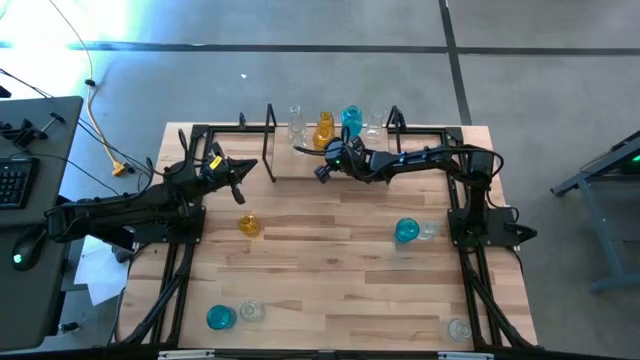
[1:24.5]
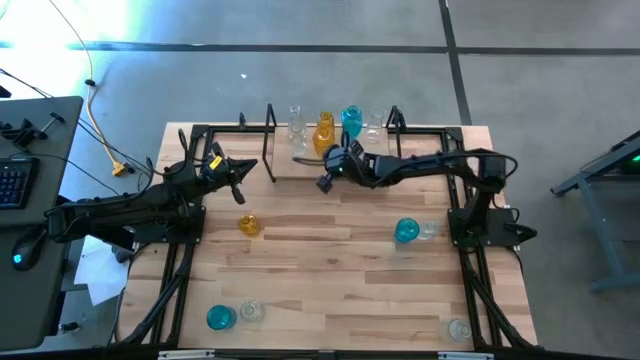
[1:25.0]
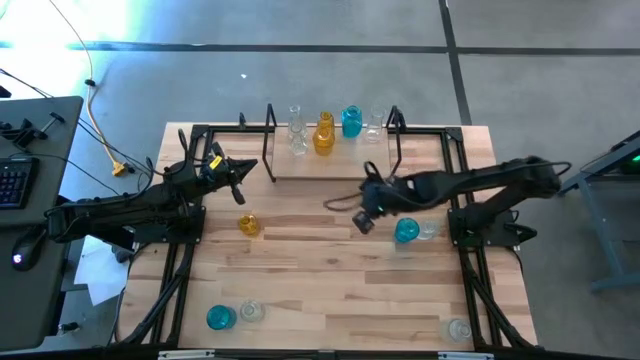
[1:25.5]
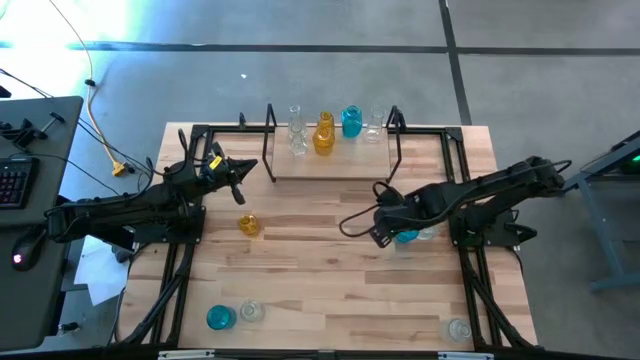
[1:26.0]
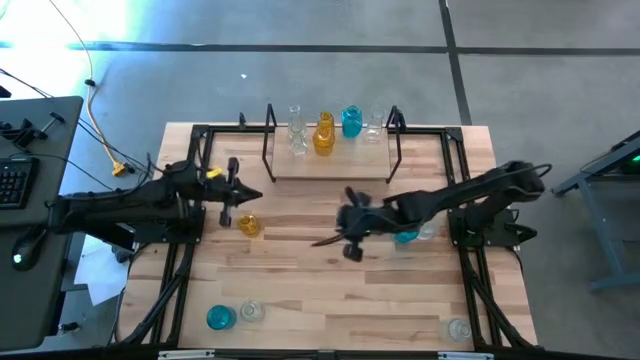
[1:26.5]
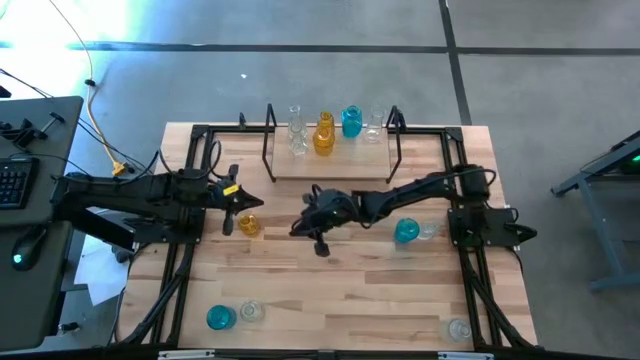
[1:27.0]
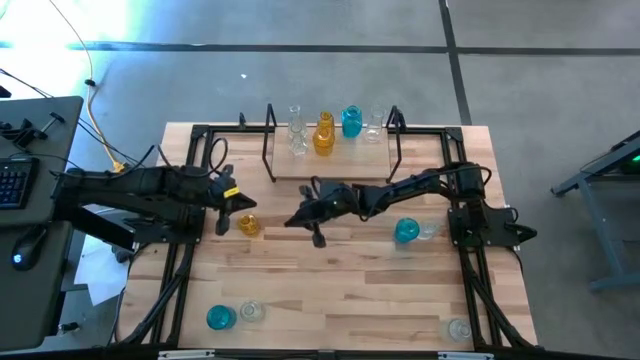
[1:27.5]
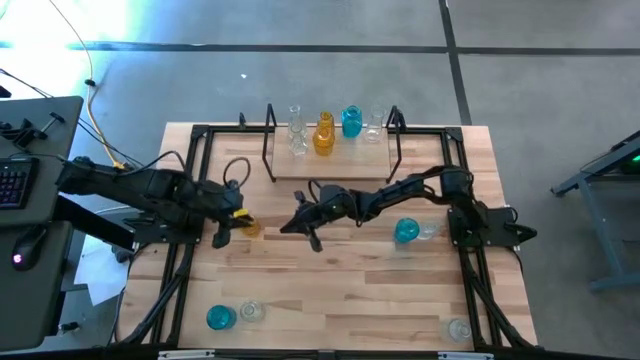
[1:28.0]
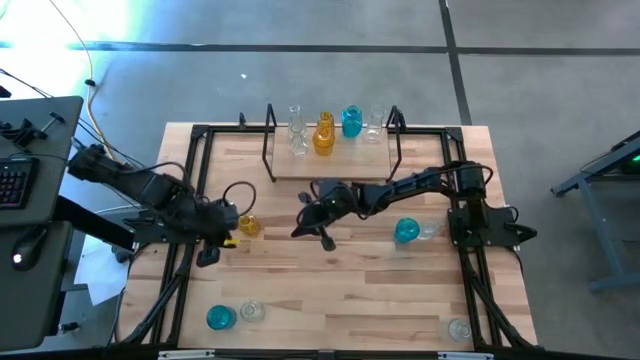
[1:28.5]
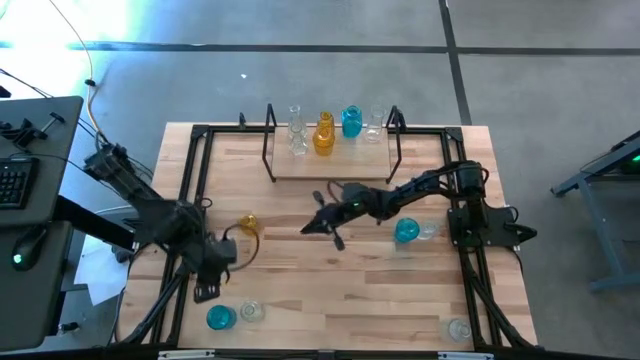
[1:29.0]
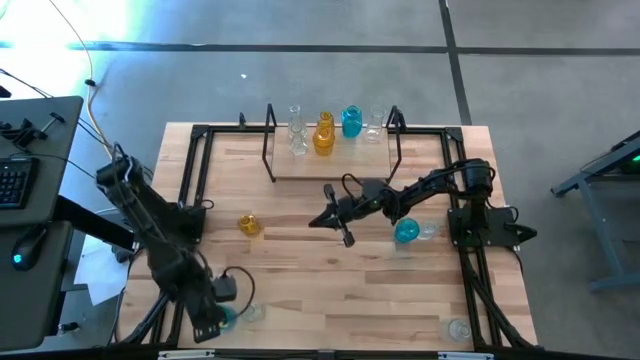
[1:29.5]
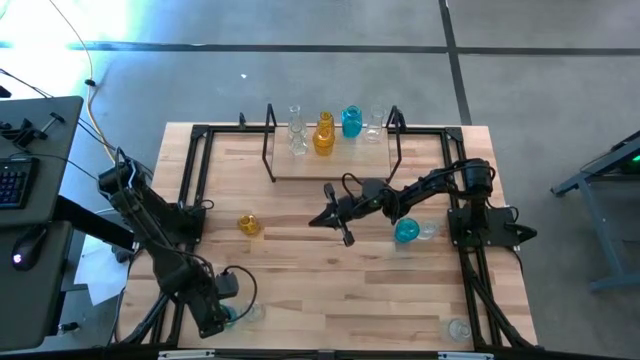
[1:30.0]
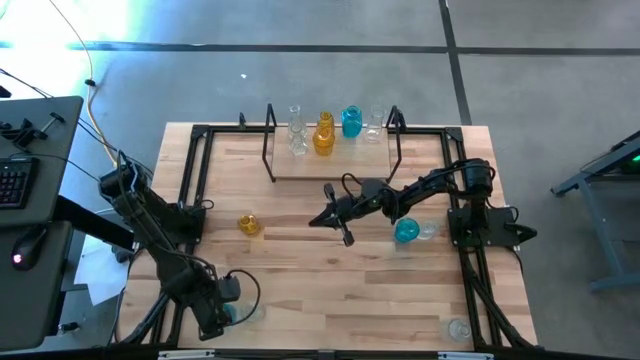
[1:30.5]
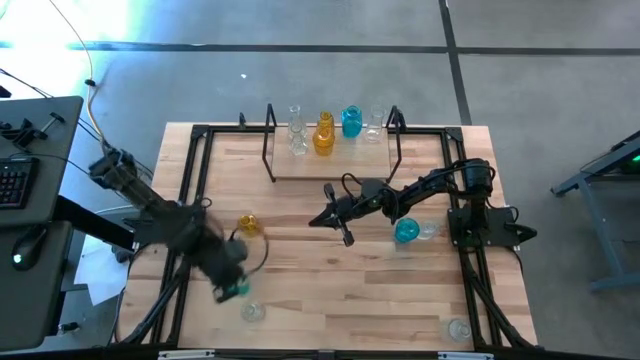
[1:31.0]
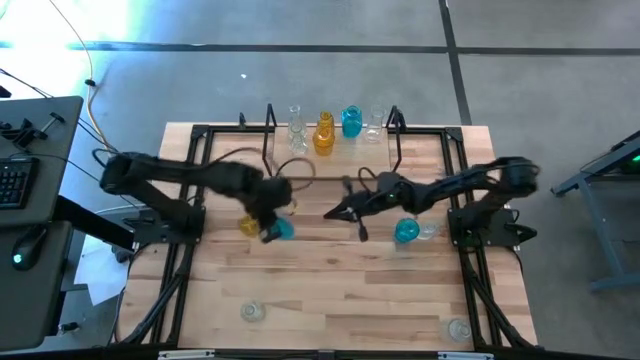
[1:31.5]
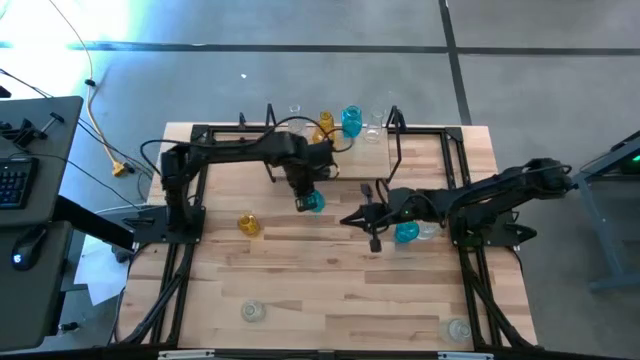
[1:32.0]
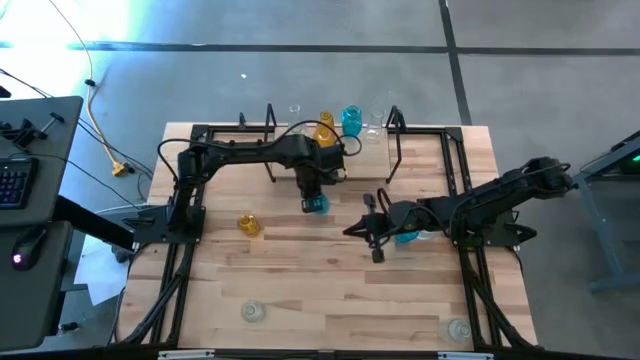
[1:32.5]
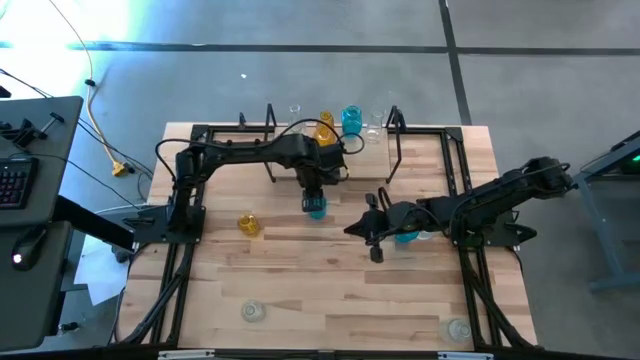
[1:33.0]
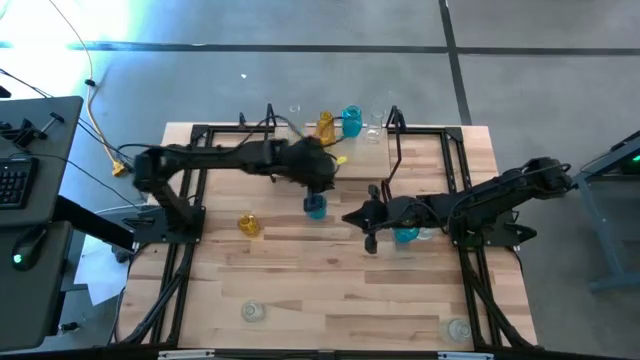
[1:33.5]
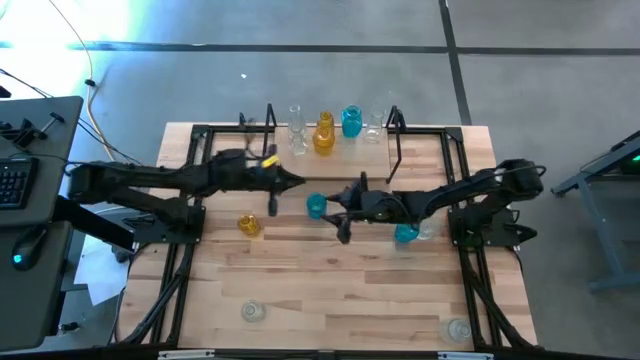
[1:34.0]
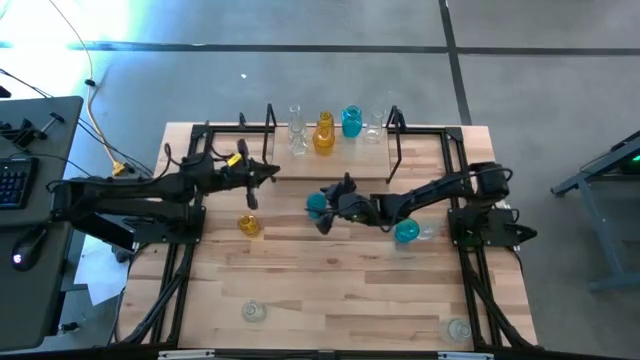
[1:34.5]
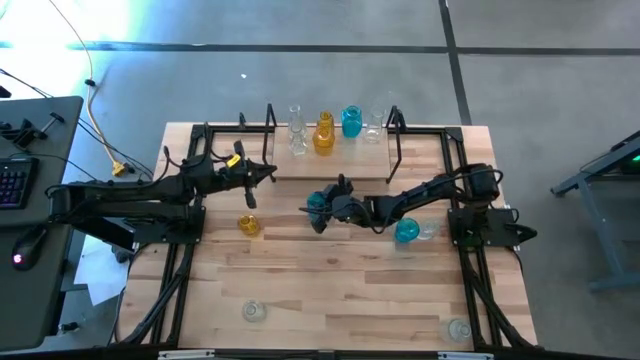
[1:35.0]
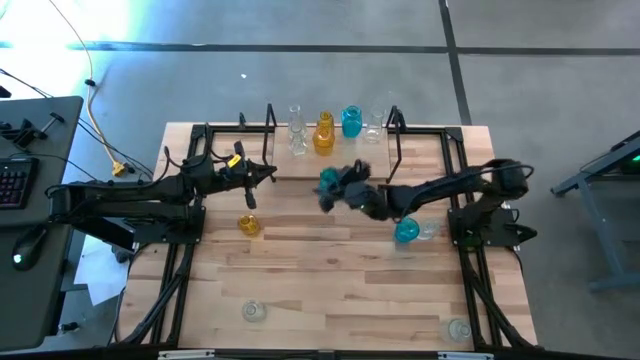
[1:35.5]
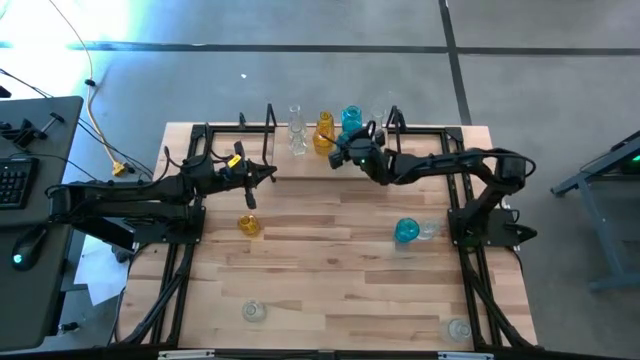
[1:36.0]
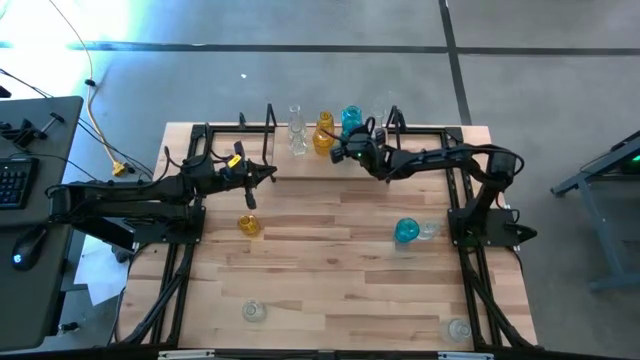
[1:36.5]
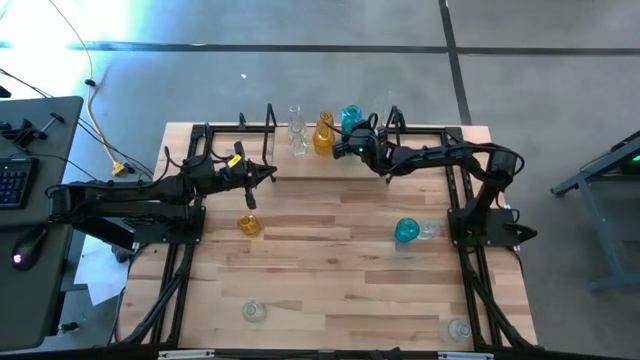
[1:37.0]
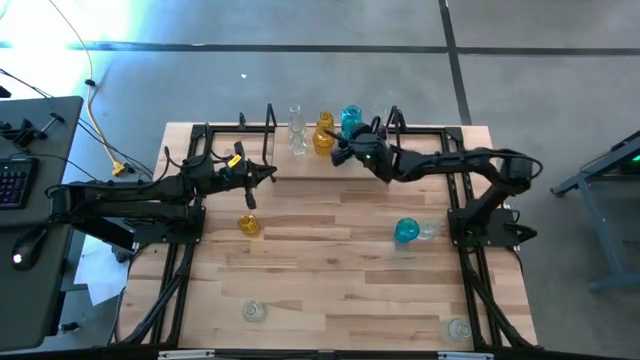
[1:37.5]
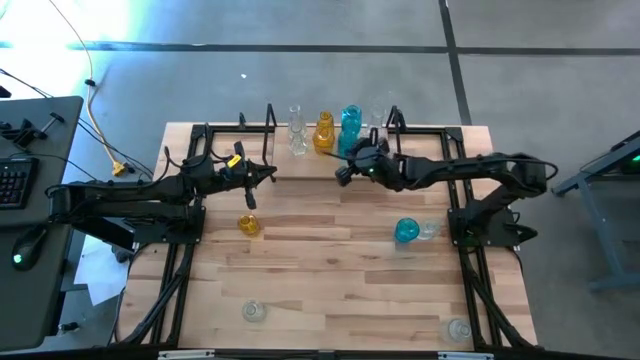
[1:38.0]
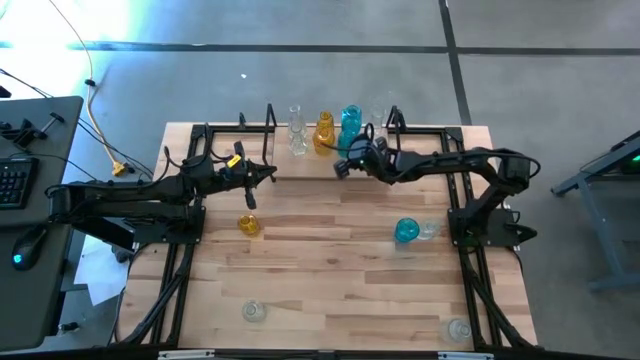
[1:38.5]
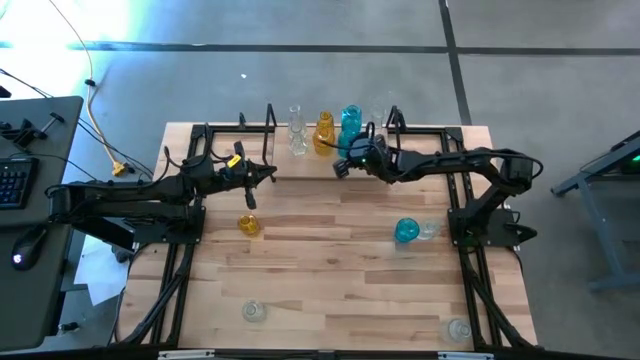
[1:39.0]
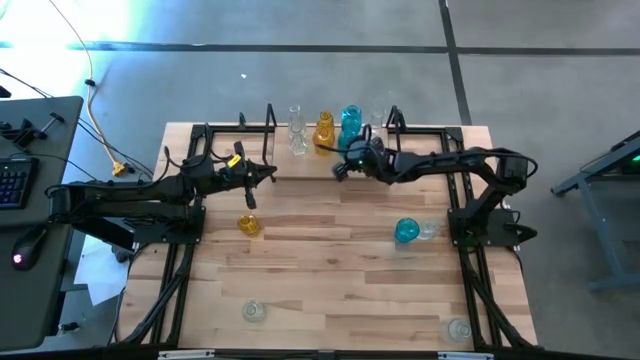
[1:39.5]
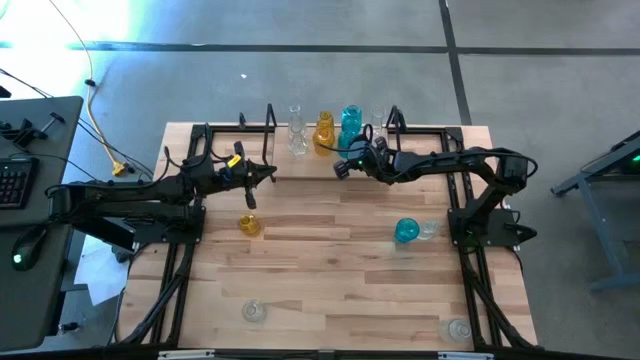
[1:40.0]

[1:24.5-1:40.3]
Task: sort vases onto shelf
Put the blue vase on the shelf aligned with the other blue vase

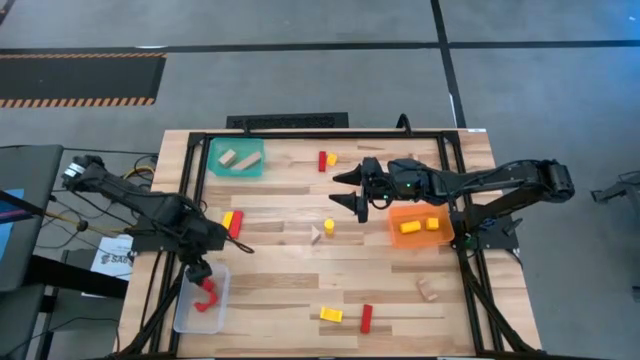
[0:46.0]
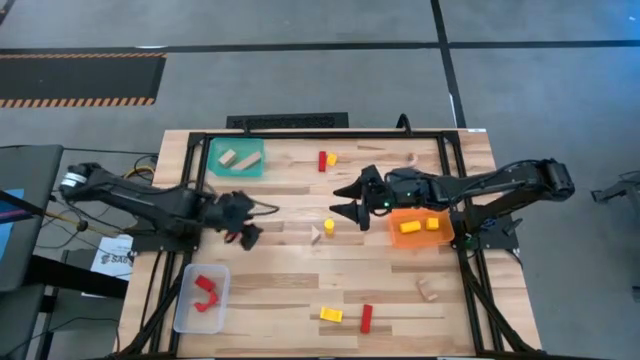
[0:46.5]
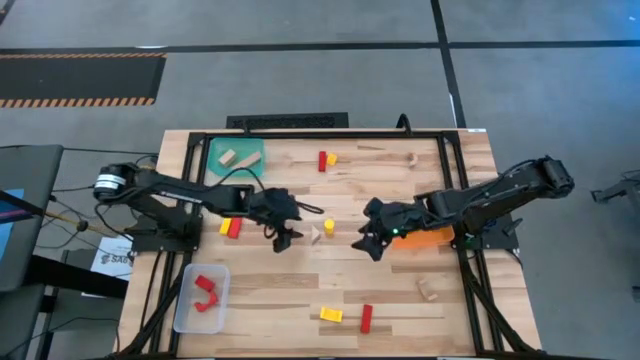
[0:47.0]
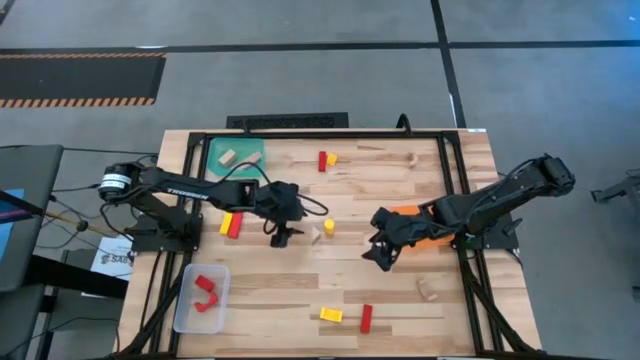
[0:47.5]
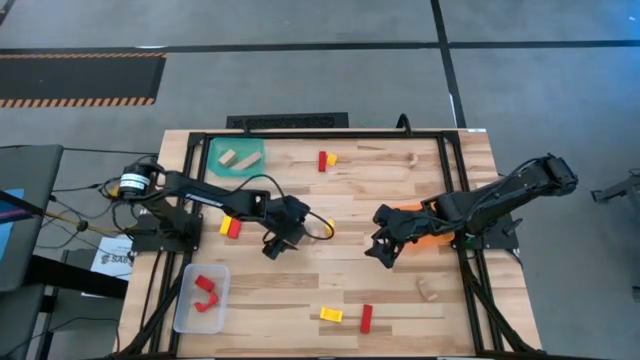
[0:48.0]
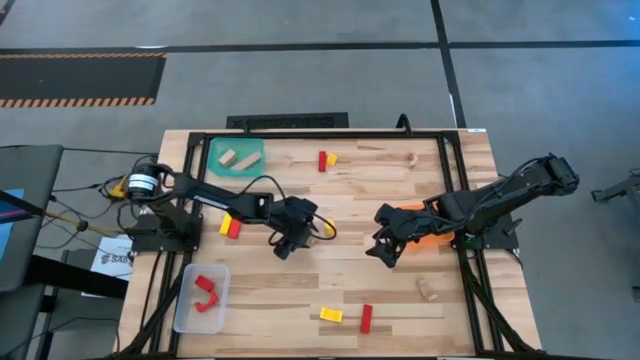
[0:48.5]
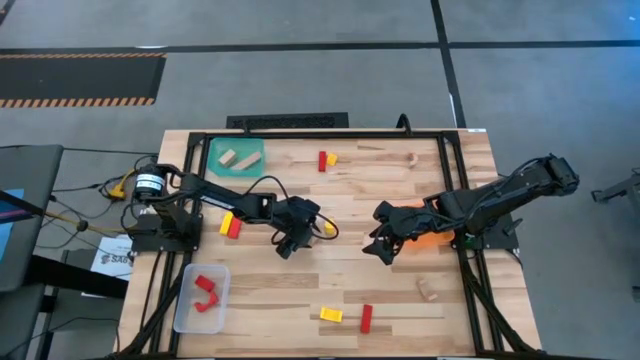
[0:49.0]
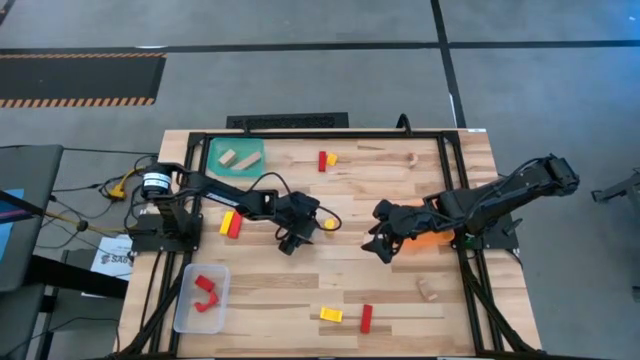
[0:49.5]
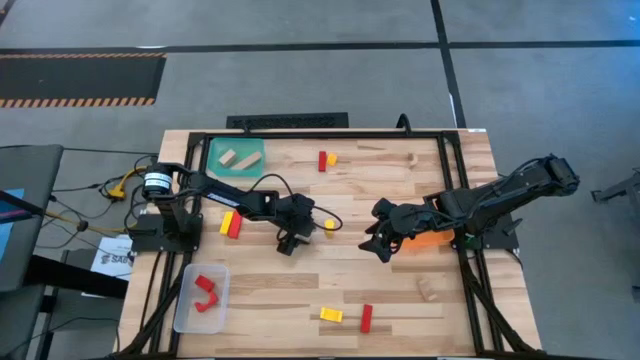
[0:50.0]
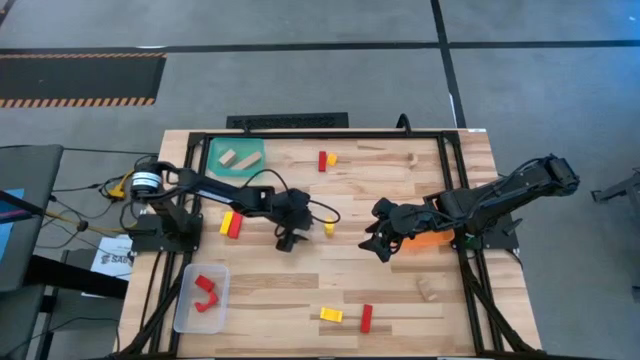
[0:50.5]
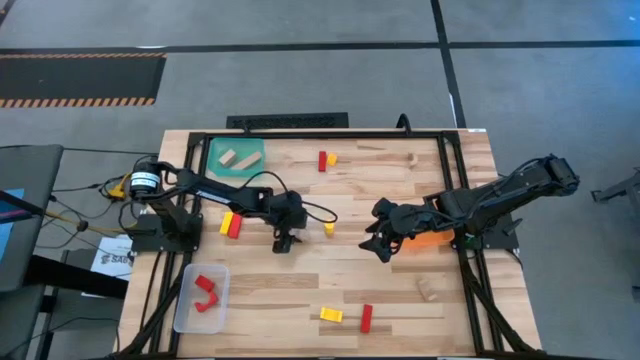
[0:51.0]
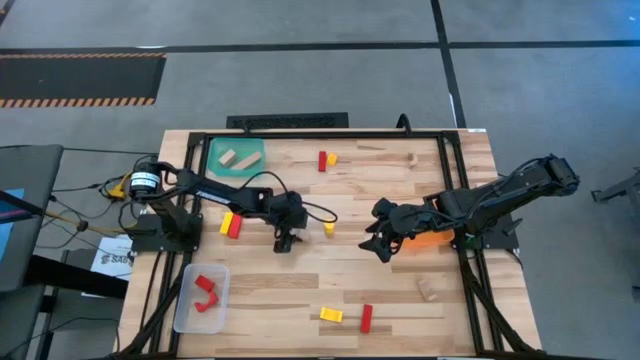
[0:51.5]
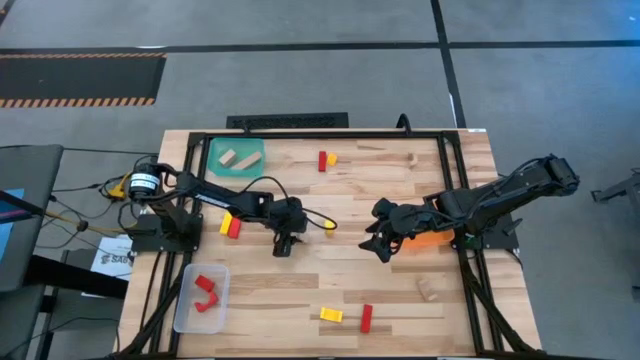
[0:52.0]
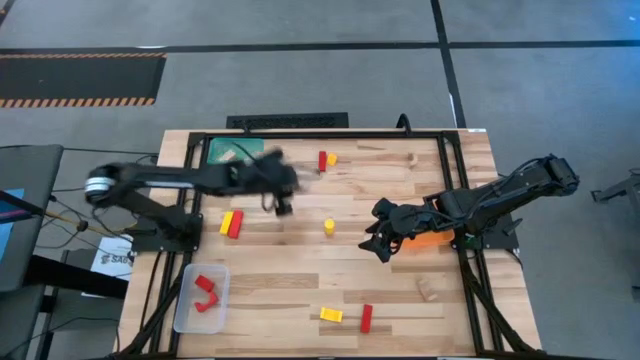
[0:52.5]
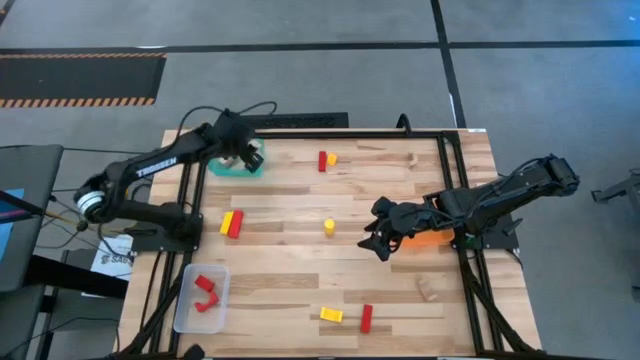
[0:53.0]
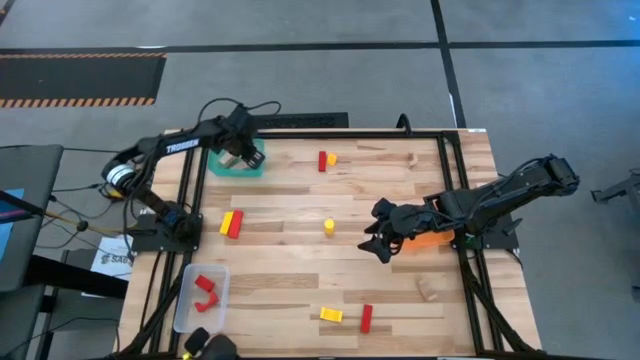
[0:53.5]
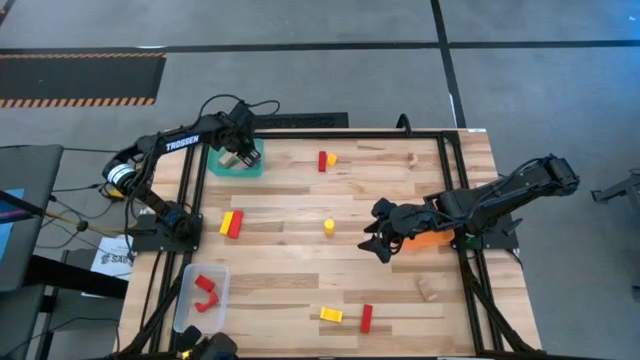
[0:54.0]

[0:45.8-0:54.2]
Task: Sort & place blocks by color
Put the light brown block into the light blue bin
